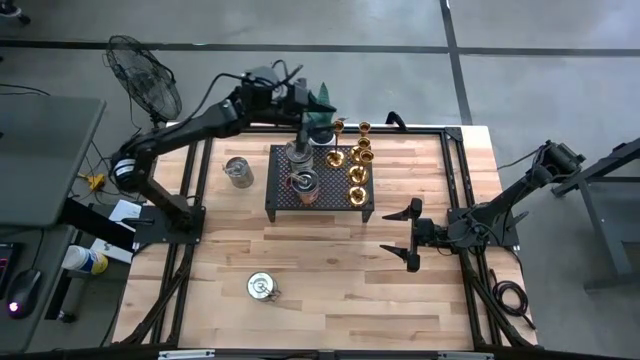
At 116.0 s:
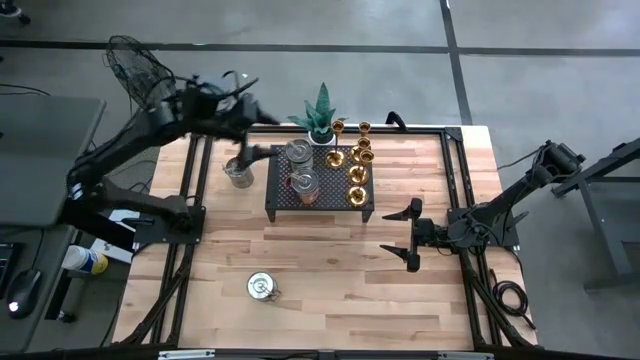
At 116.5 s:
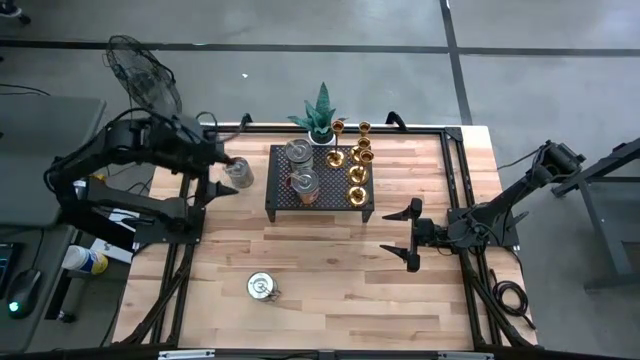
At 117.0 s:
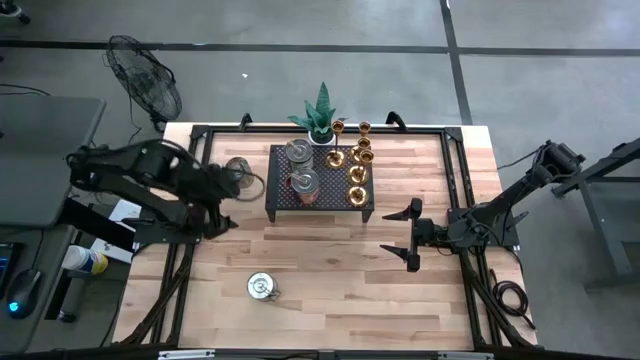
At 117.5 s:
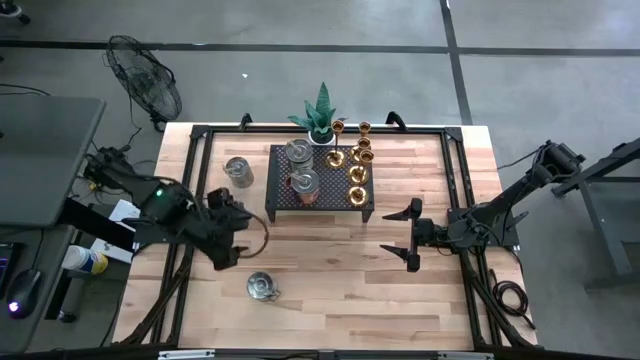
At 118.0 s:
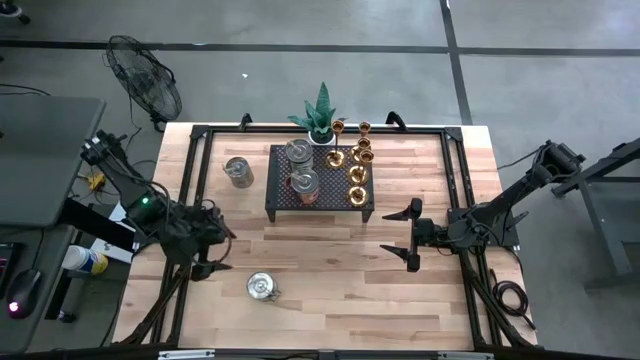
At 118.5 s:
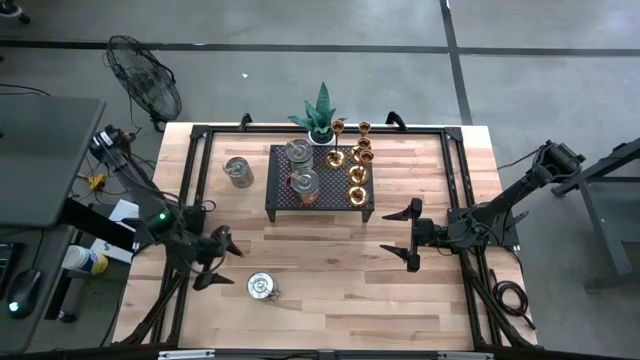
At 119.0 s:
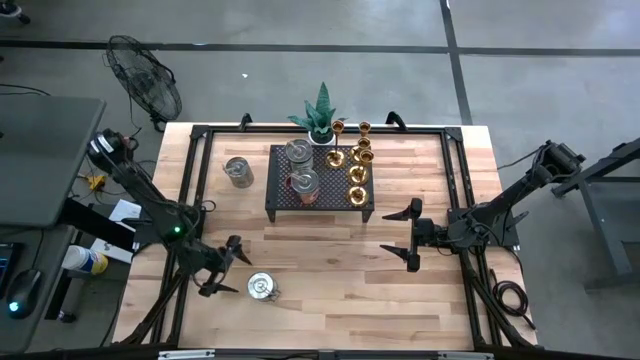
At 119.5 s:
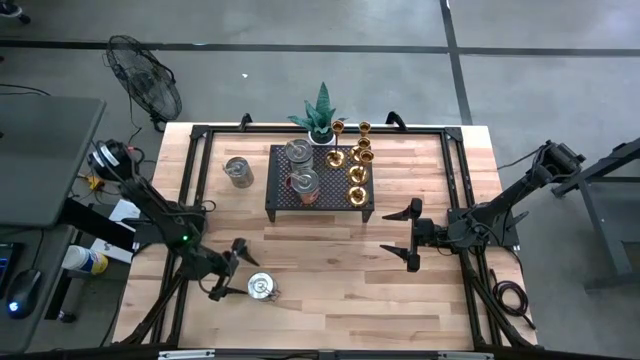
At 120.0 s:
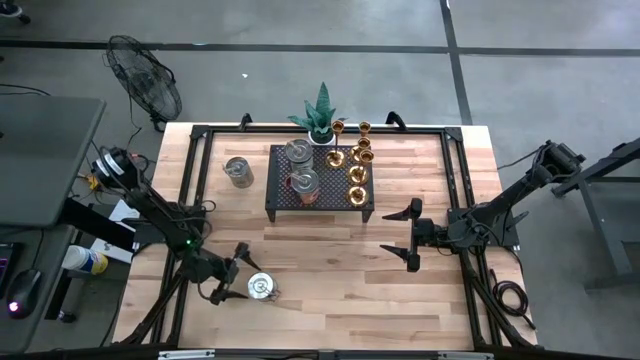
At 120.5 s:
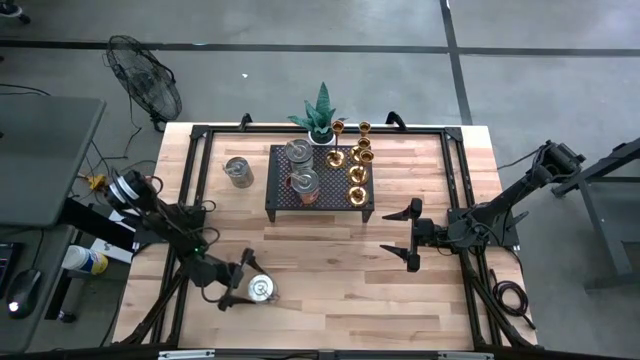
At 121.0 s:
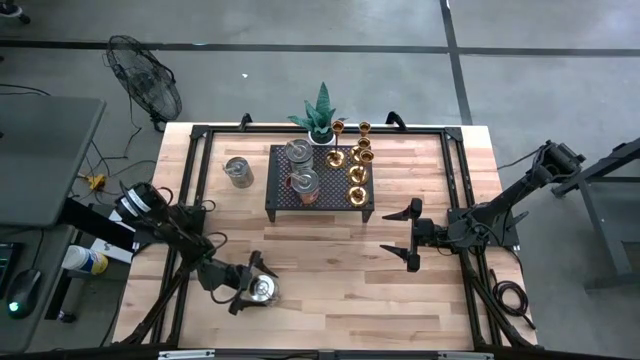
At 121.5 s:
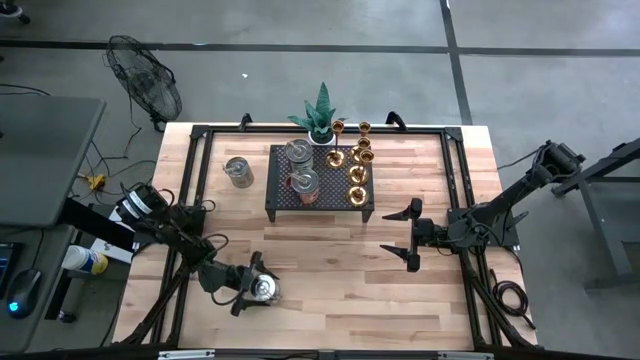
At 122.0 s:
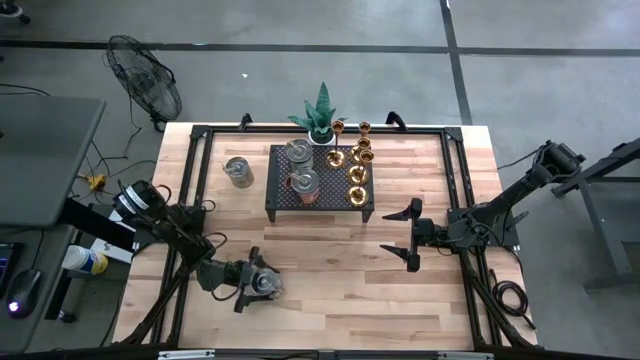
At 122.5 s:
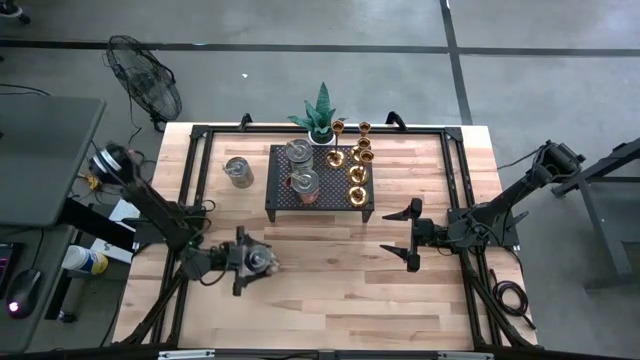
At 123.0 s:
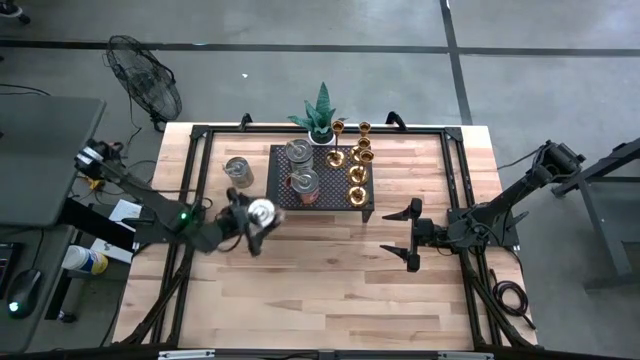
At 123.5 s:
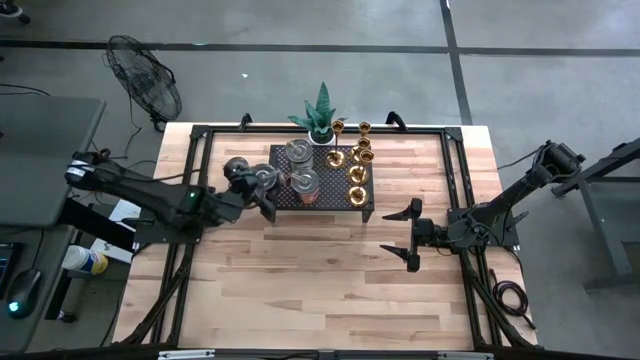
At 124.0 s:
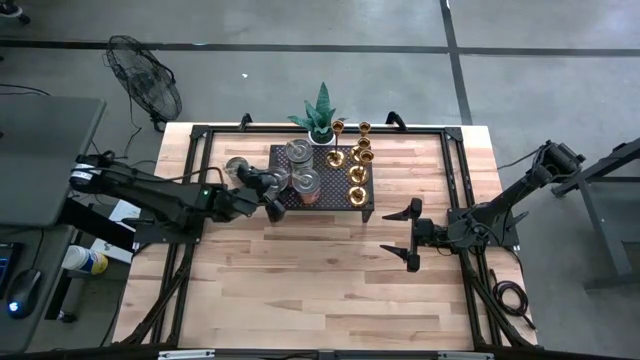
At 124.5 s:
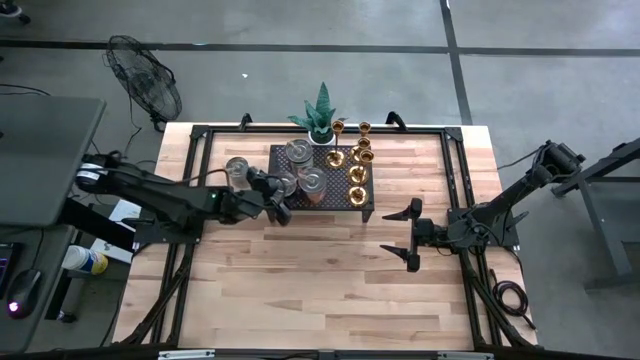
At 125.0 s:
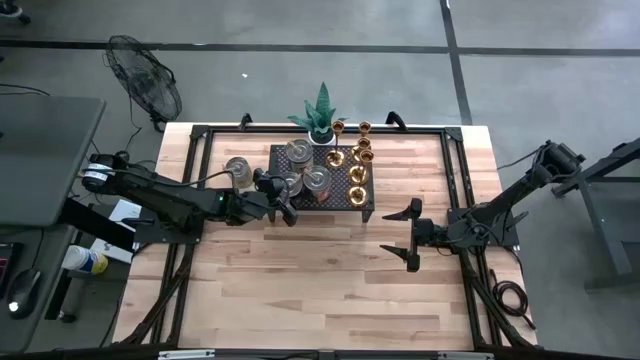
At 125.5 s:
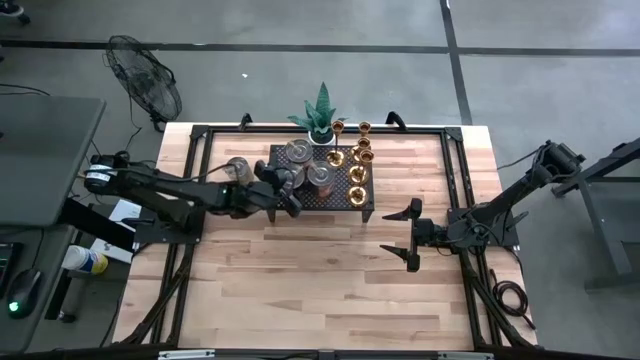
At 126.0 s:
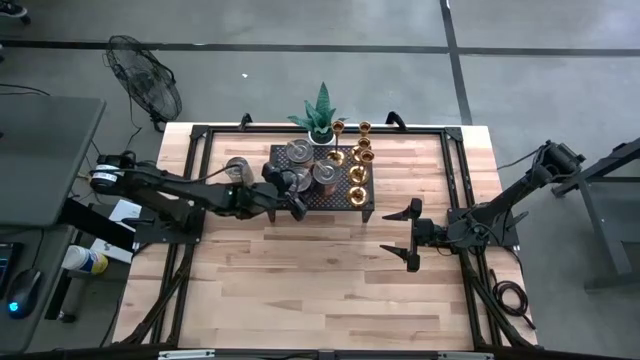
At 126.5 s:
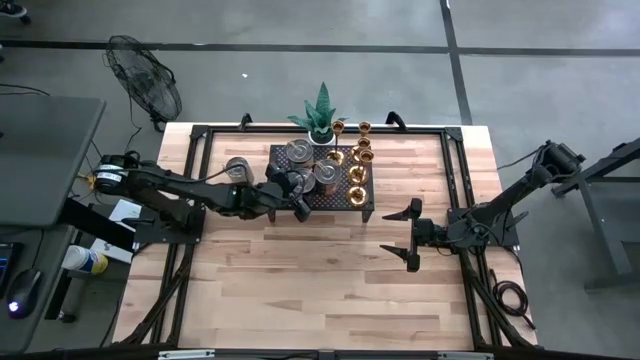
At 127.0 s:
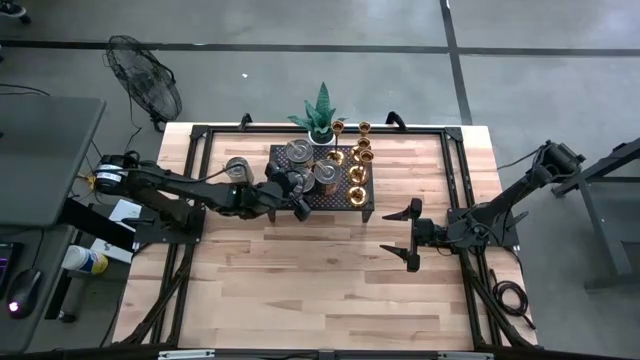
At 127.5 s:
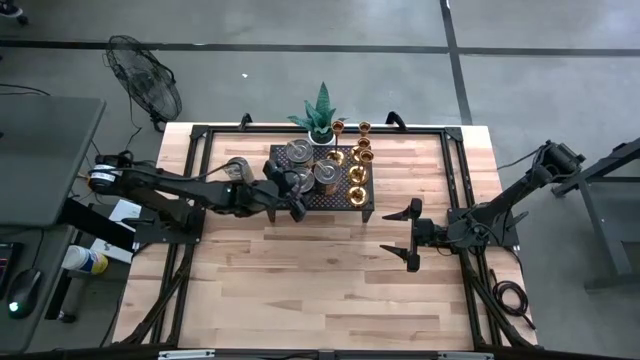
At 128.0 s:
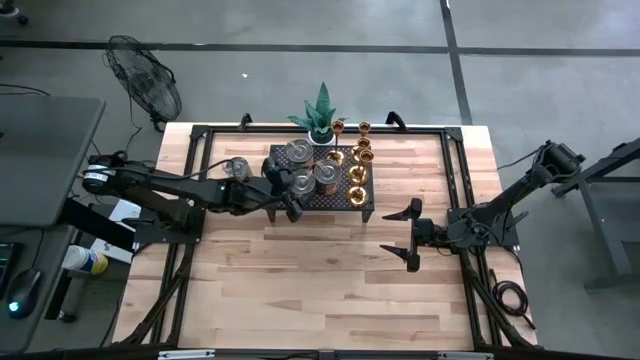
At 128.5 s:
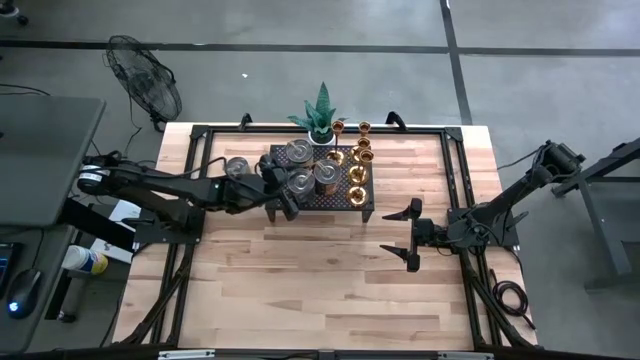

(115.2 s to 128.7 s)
Task: Pick & Place candle stick holders
Put the silver scented candle on the shelf

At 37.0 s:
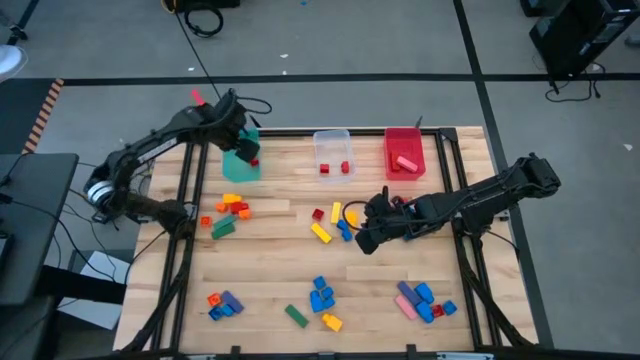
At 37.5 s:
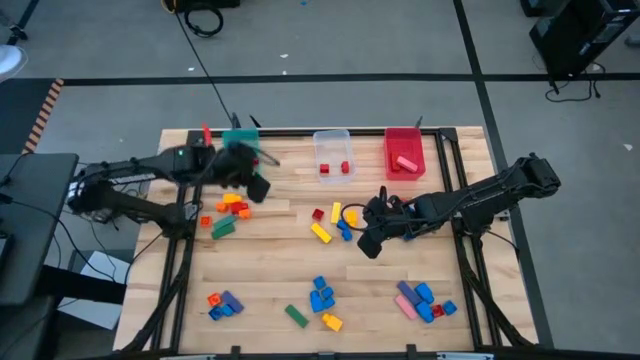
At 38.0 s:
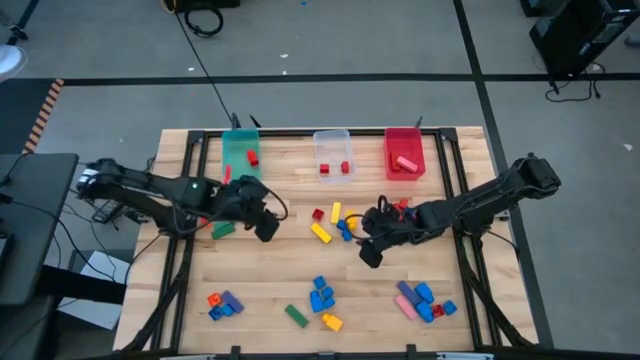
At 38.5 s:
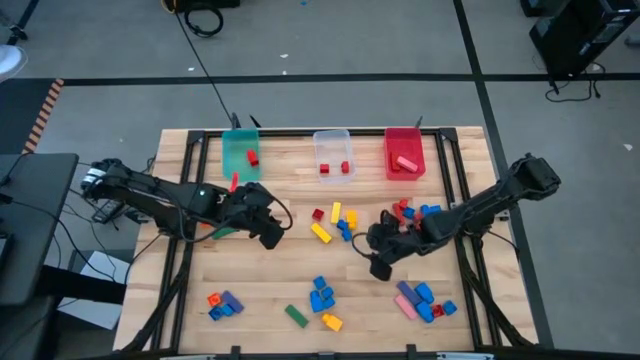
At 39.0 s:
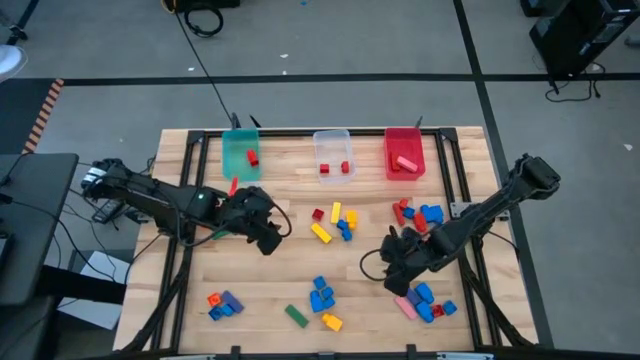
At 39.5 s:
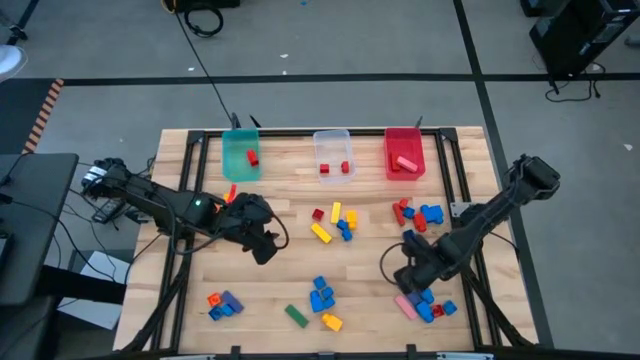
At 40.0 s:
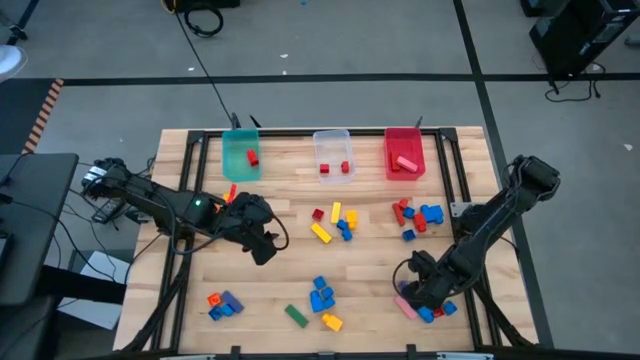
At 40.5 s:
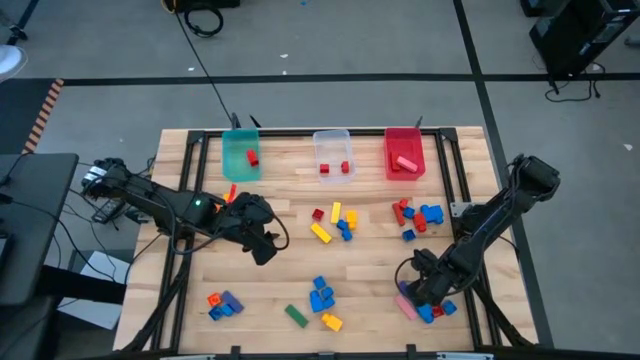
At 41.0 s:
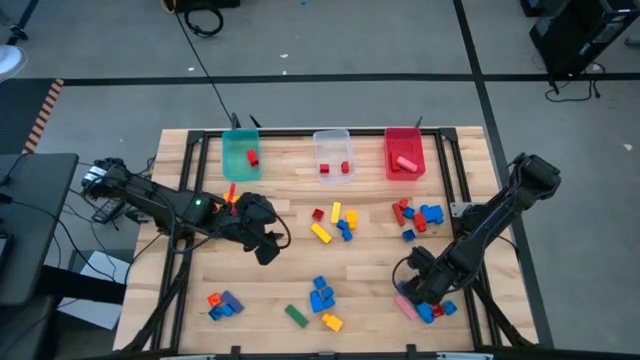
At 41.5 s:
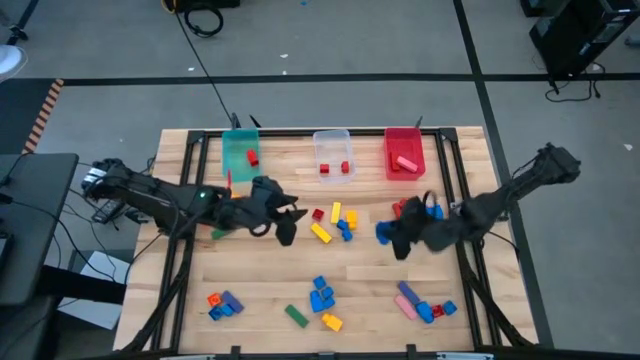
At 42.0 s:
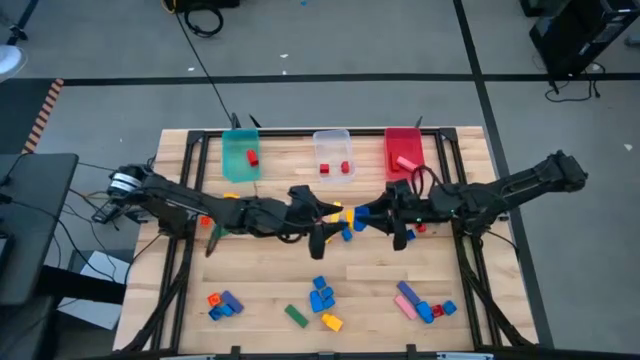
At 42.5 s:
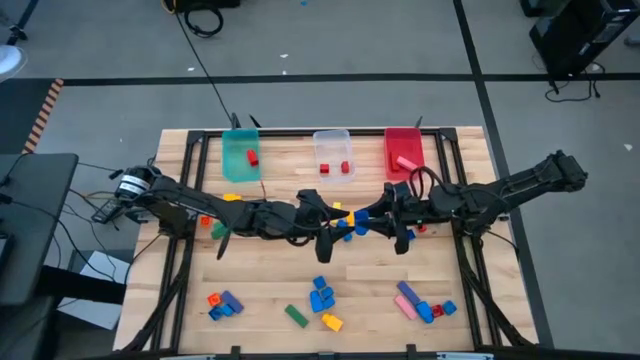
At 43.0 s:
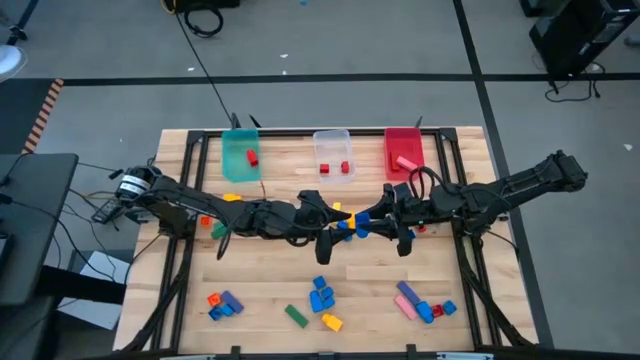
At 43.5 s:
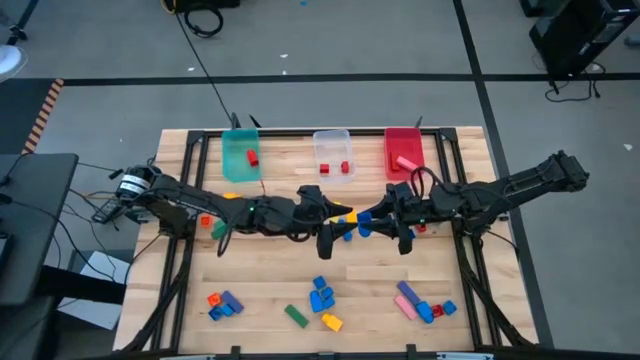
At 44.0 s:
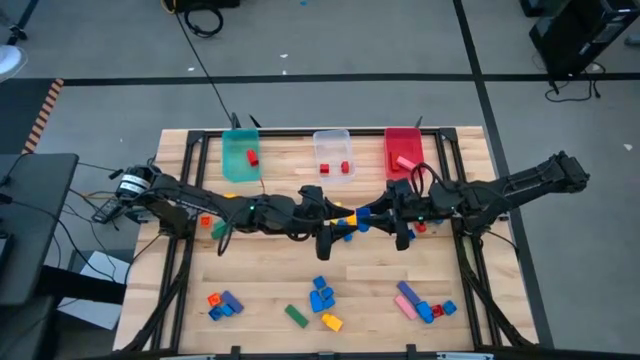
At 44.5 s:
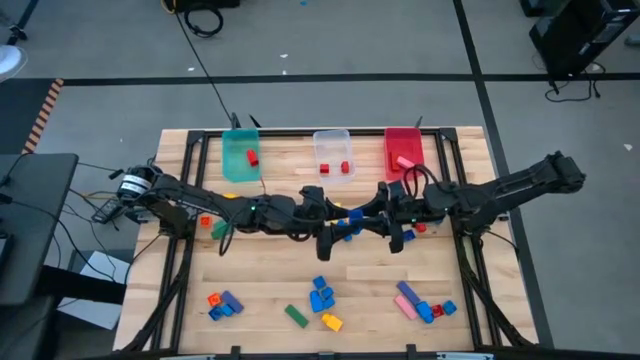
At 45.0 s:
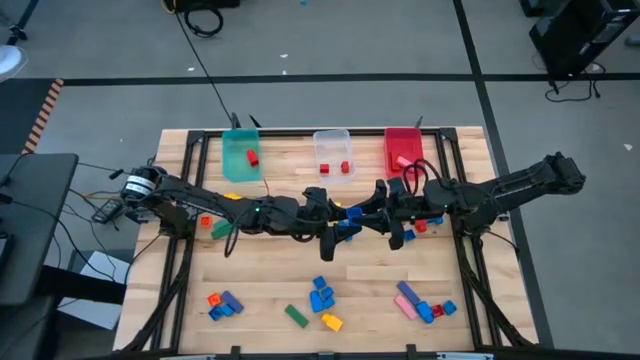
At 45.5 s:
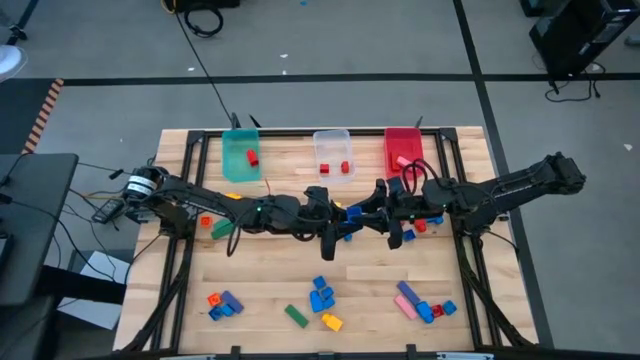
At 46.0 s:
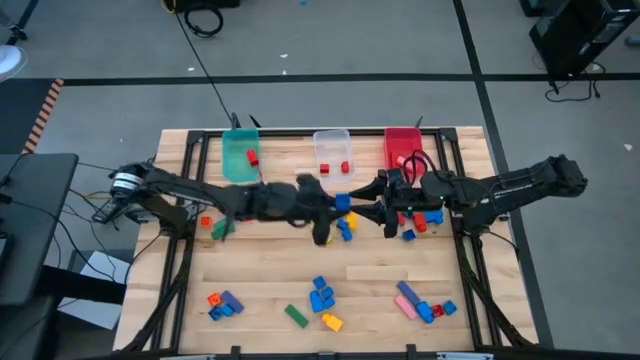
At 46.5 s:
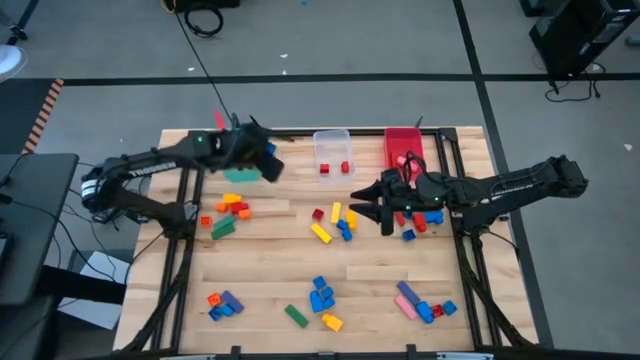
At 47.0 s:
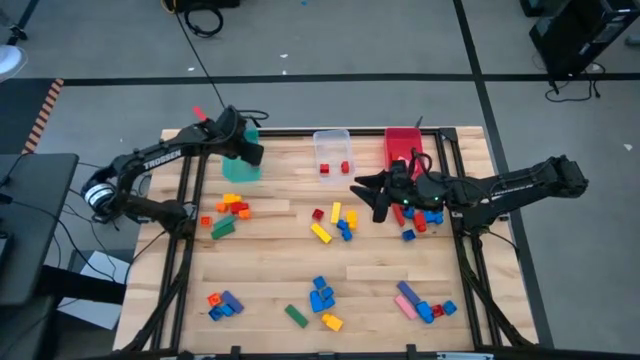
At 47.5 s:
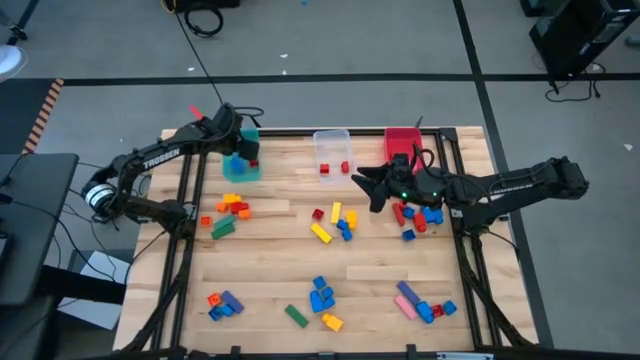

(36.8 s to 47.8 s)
Task: Sort blocks by size
Put the blue 1 stud game piece into the blue bin
